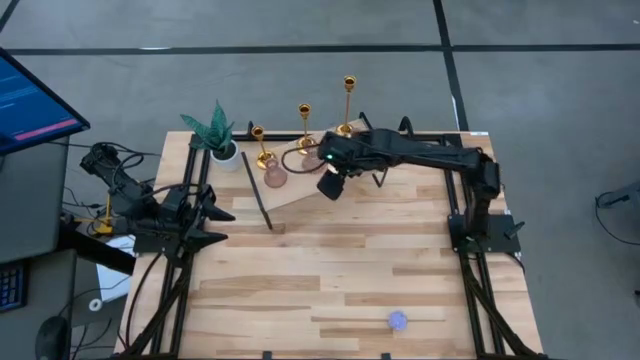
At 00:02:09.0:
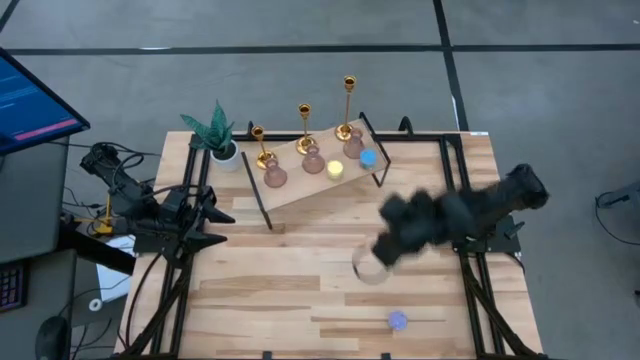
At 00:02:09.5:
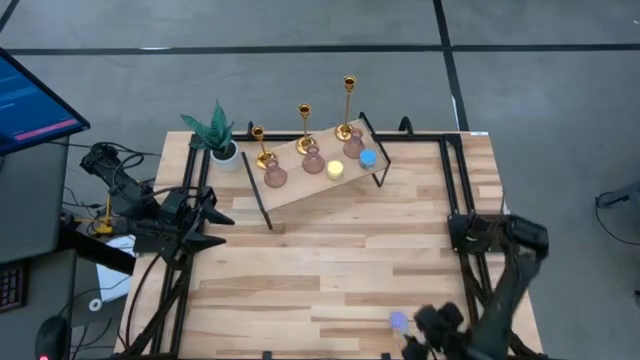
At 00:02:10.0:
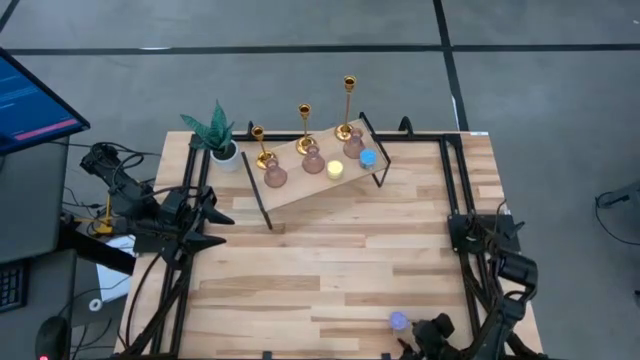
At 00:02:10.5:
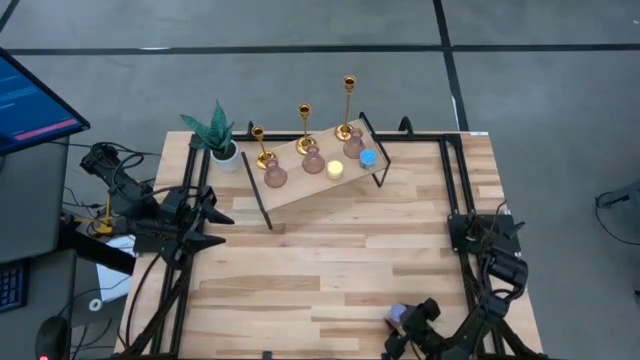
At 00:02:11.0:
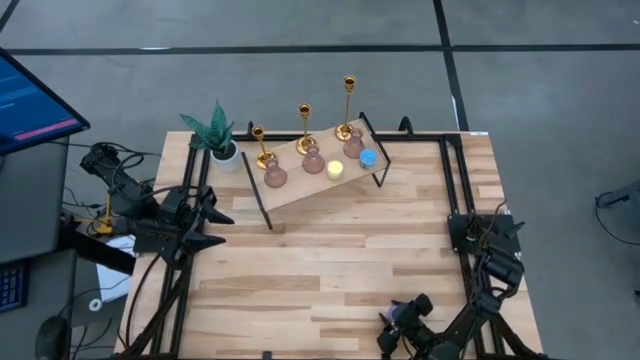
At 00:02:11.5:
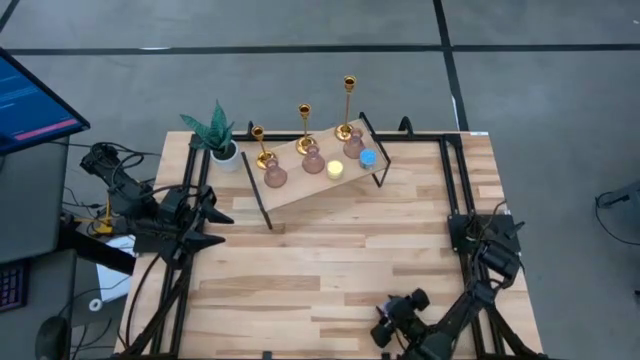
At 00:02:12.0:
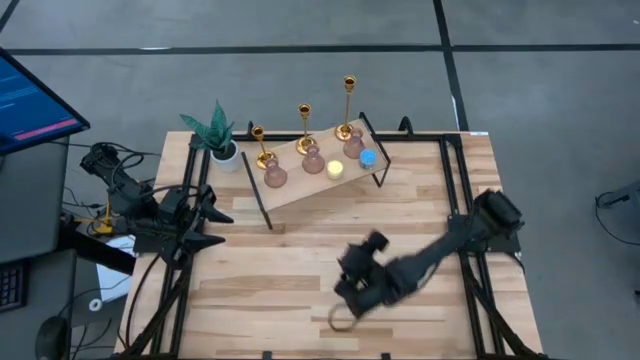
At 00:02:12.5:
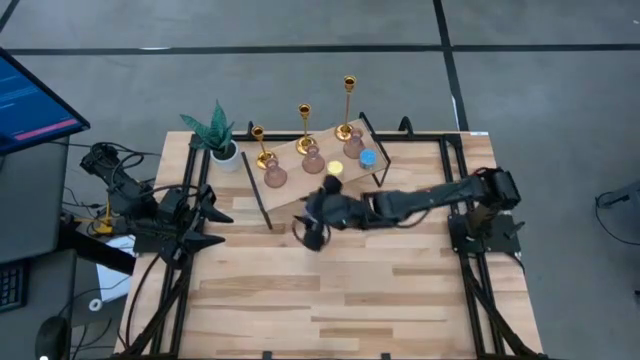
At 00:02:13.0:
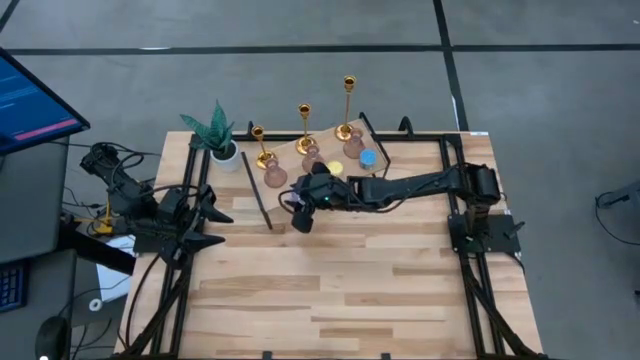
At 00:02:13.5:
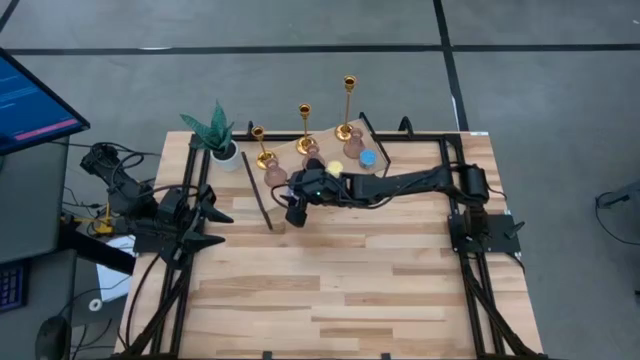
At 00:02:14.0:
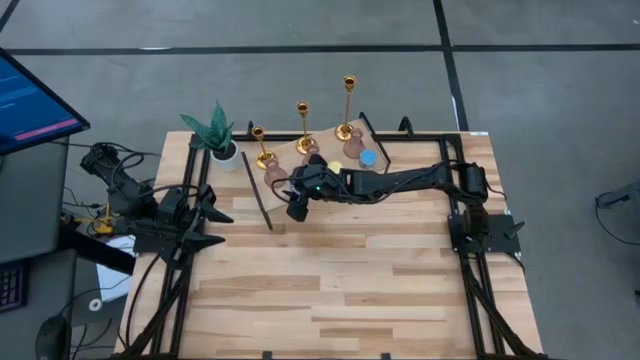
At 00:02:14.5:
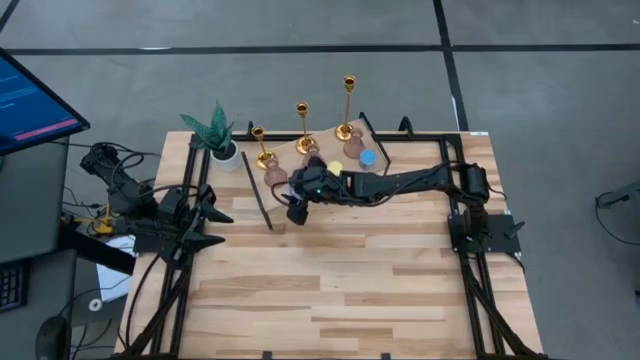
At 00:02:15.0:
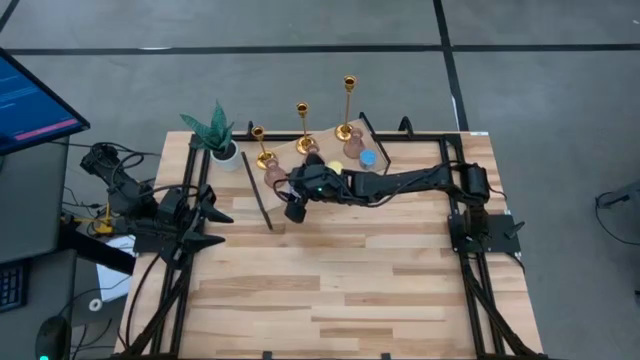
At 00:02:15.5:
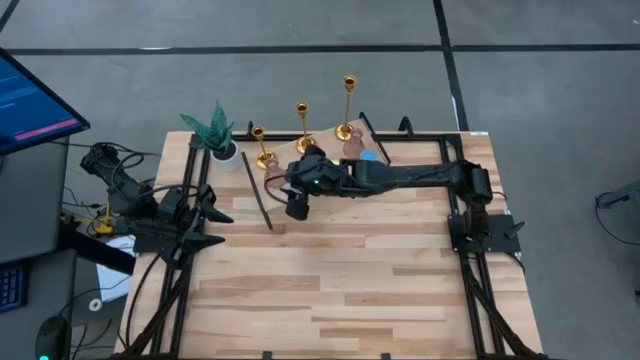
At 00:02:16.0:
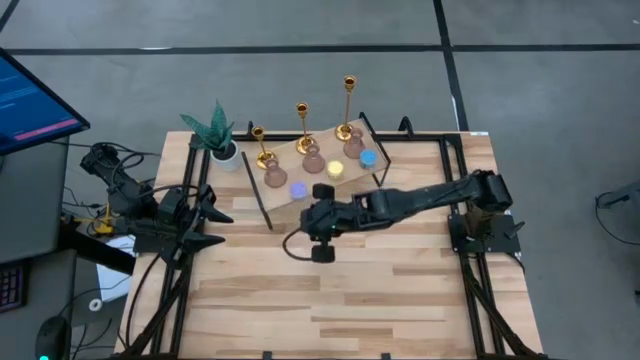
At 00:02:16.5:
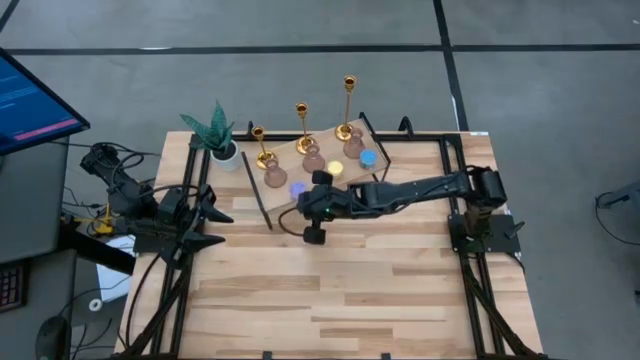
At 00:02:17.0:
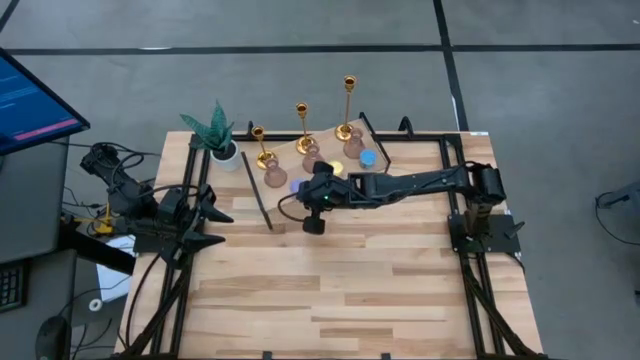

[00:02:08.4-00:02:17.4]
Task: Pick & Place candle stick holders
Put the purple scented candle on the shelf

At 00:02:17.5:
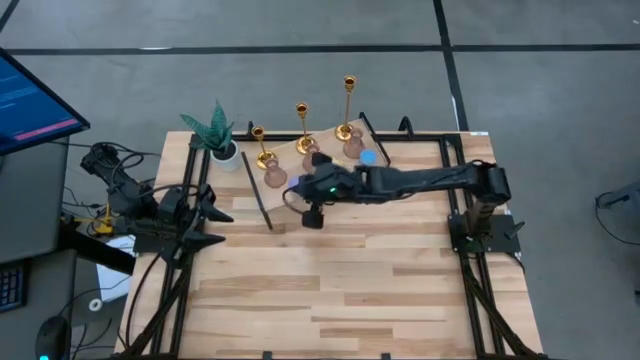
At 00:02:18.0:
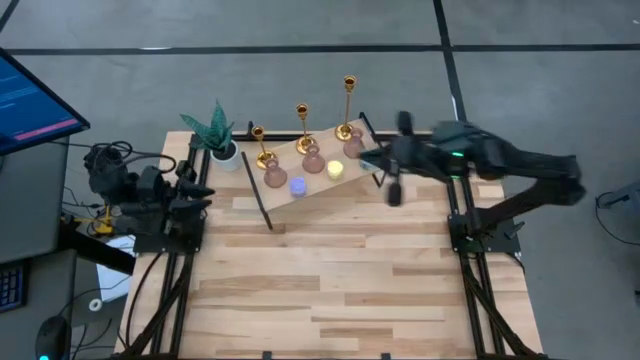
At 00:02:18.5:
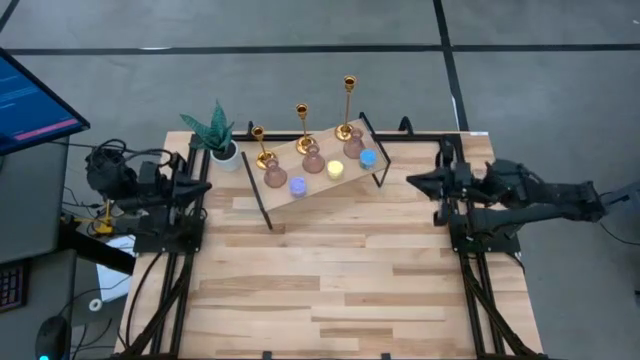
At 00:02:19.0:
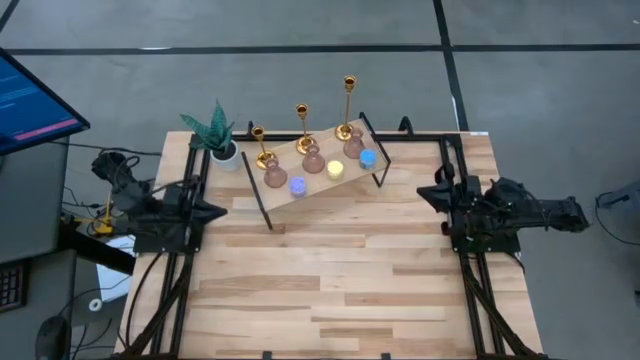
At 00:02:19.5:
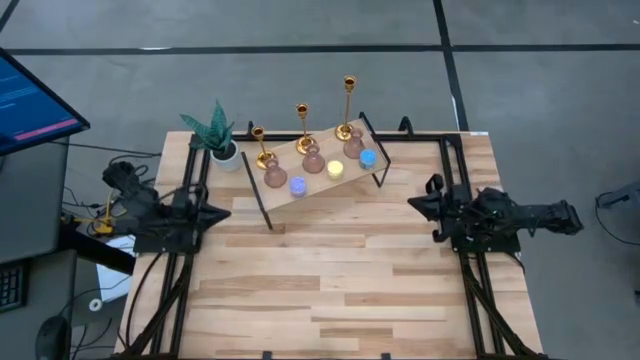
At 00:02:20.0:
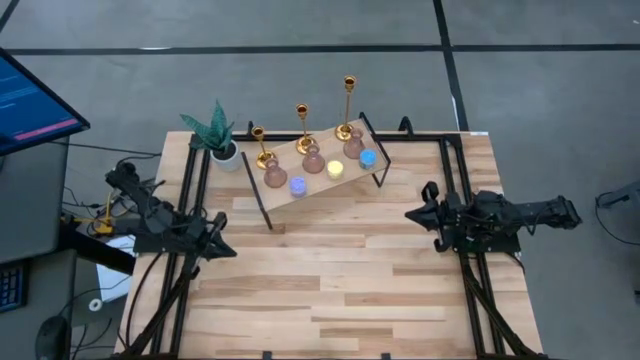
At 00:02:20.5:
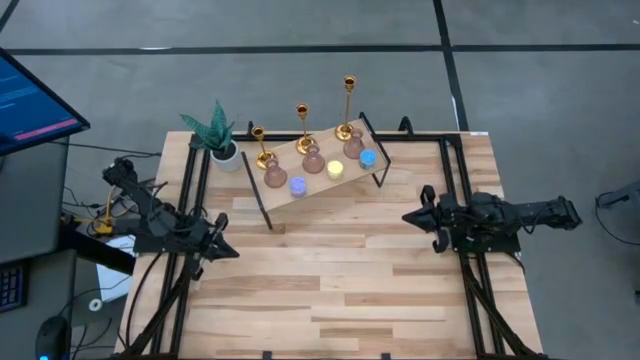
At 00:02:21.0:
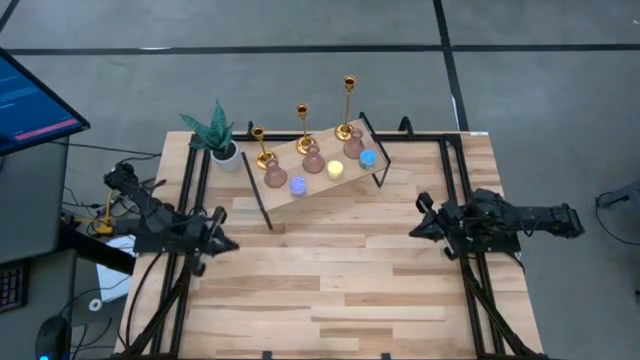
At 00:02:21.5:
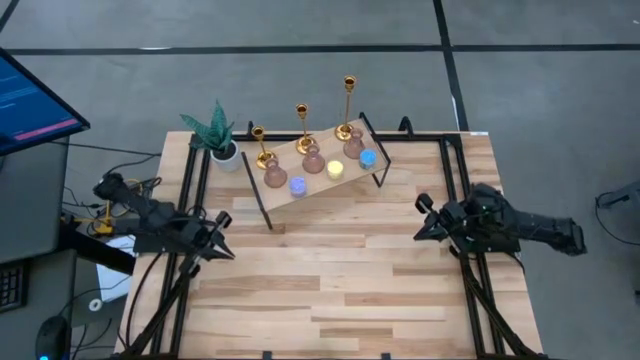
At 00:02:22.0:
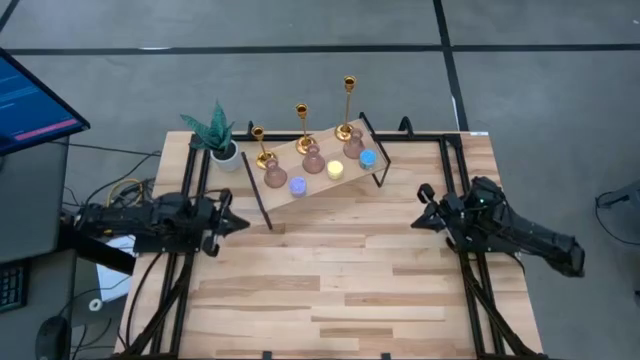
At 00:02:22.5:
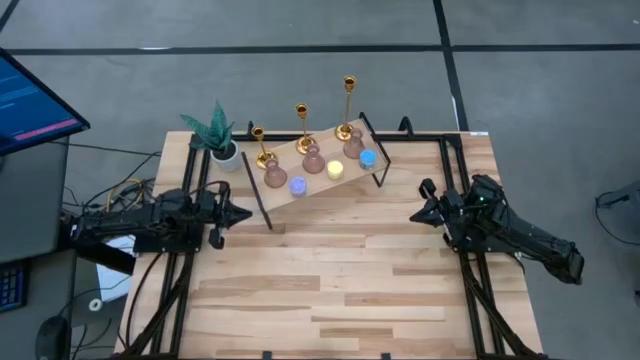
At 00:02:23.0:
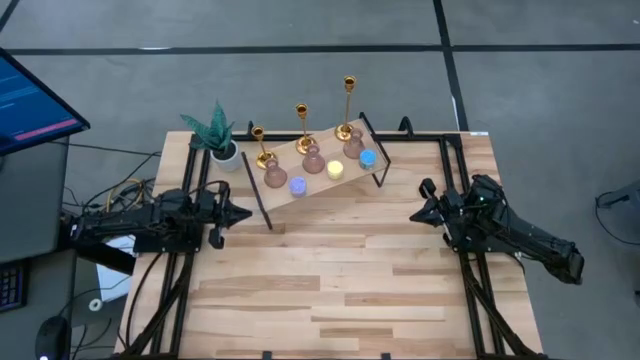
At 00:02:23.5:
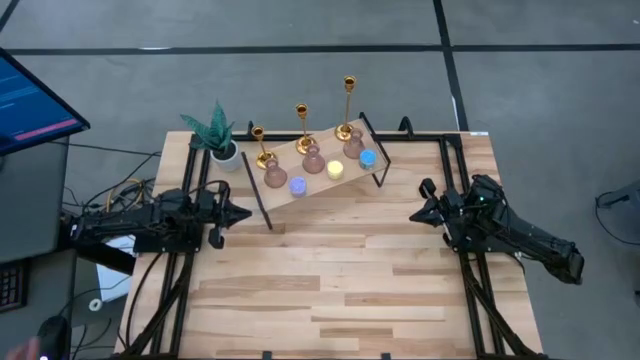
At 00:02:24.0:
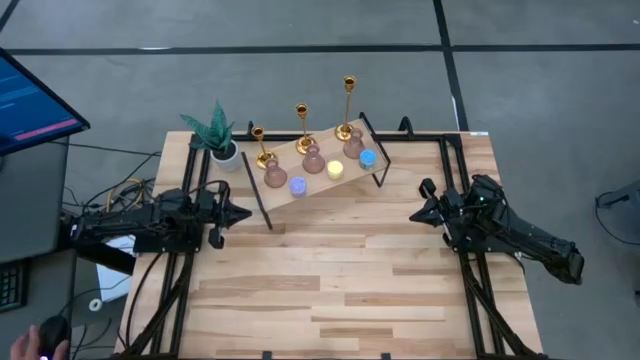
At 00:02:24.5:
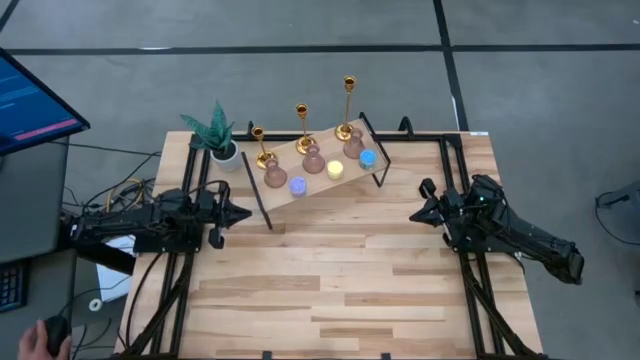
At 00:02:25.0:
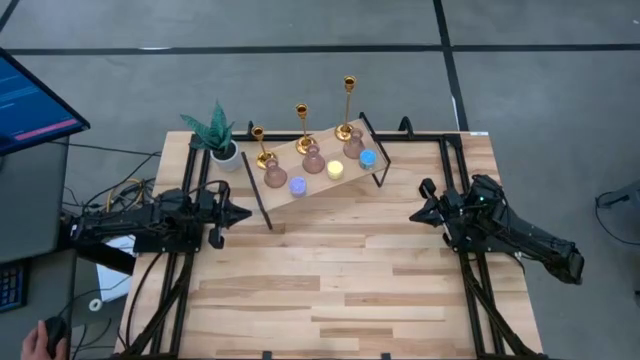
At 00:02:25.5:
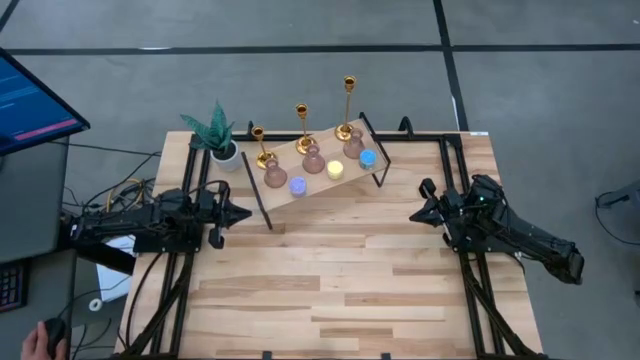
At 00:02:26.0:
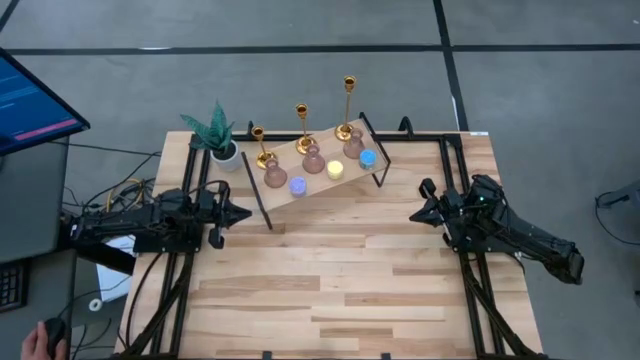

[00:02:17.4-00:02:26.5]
Return to Home Position
